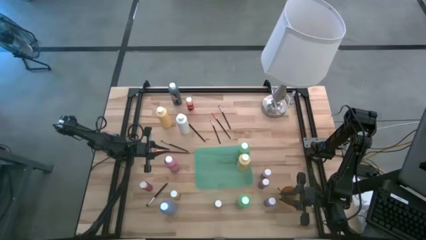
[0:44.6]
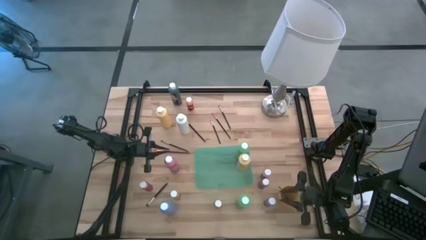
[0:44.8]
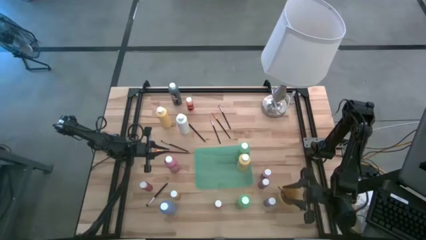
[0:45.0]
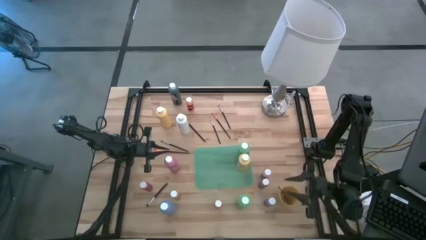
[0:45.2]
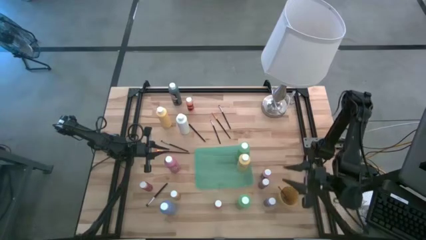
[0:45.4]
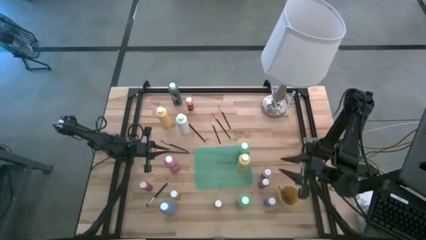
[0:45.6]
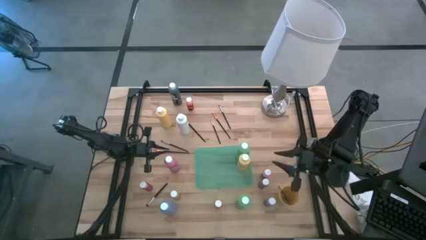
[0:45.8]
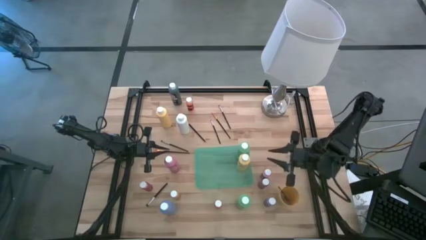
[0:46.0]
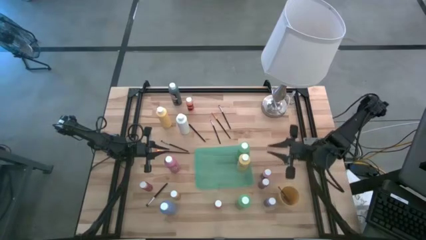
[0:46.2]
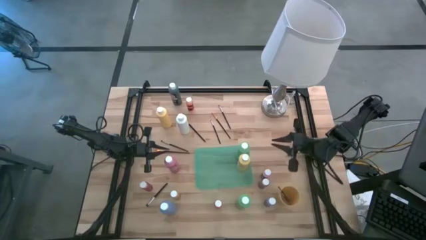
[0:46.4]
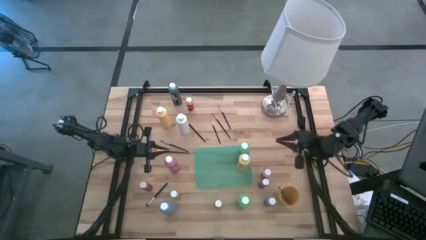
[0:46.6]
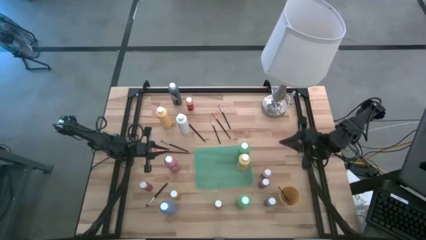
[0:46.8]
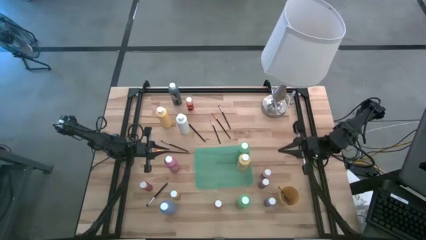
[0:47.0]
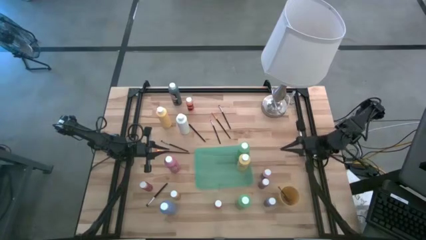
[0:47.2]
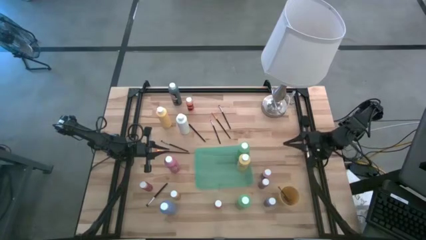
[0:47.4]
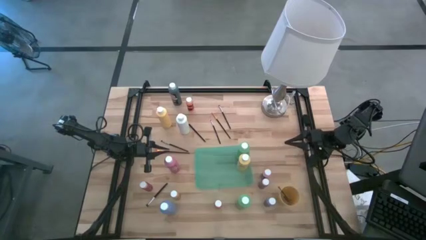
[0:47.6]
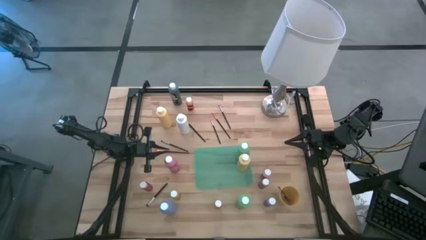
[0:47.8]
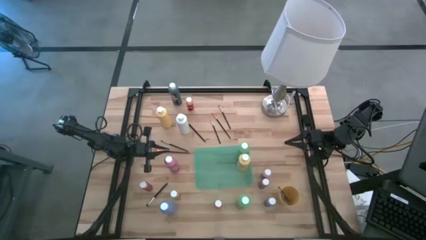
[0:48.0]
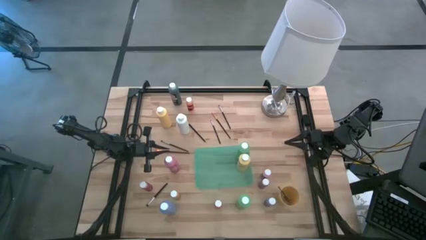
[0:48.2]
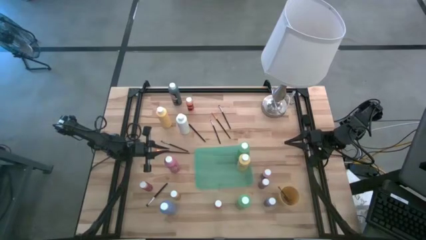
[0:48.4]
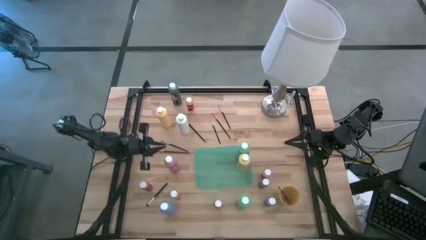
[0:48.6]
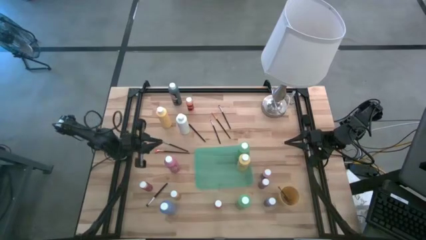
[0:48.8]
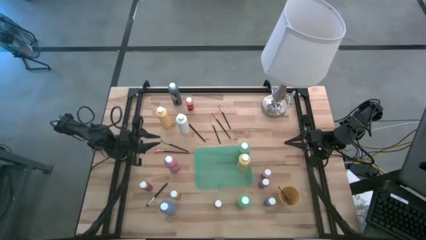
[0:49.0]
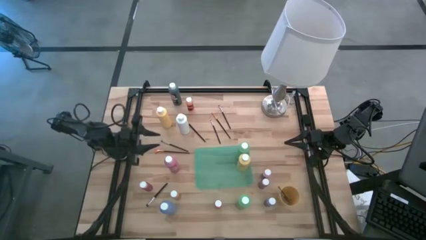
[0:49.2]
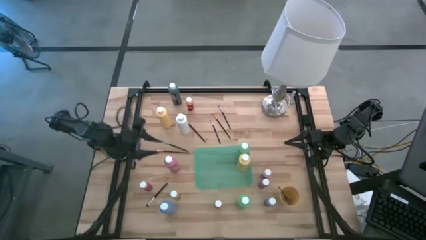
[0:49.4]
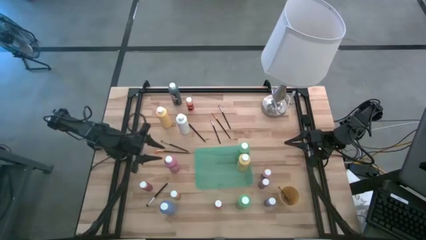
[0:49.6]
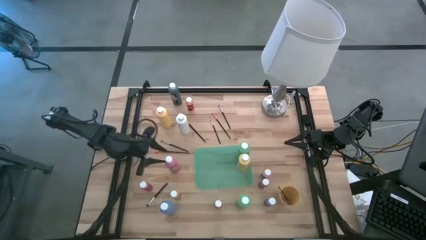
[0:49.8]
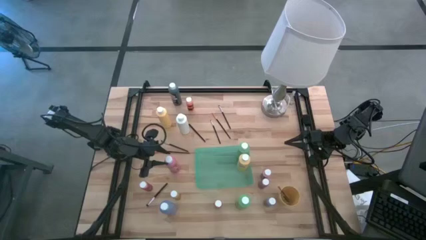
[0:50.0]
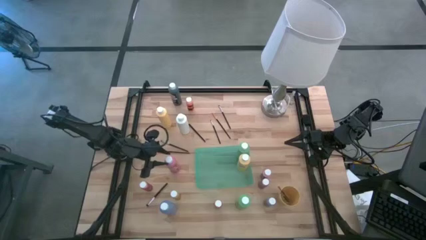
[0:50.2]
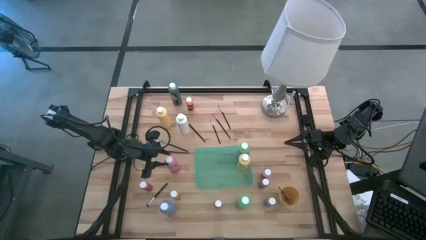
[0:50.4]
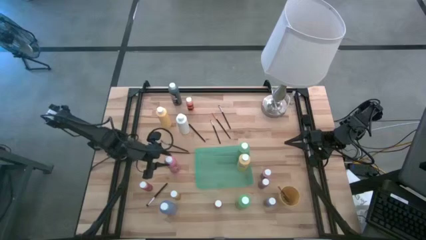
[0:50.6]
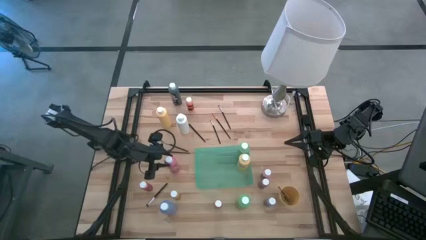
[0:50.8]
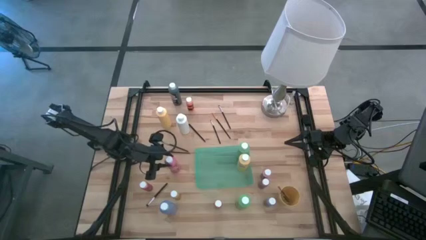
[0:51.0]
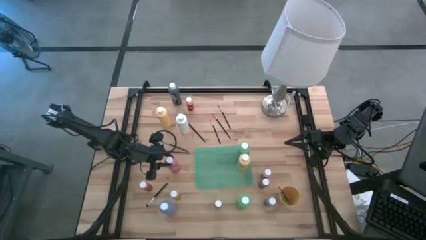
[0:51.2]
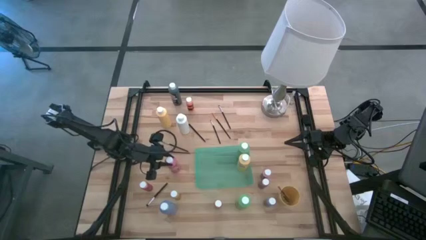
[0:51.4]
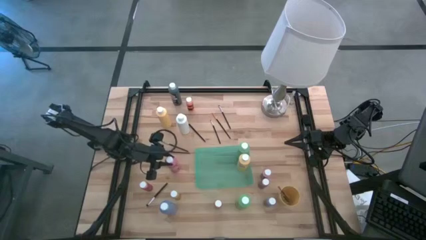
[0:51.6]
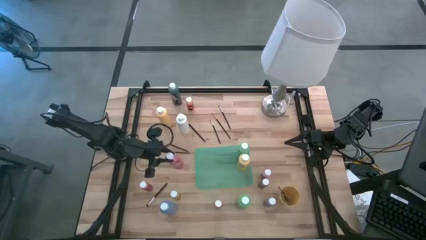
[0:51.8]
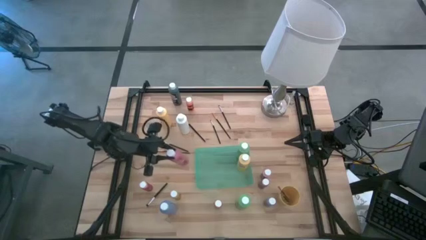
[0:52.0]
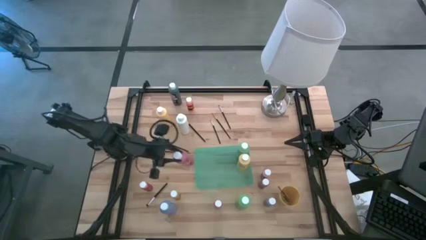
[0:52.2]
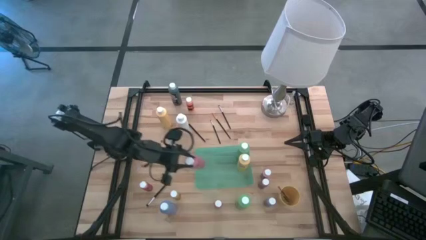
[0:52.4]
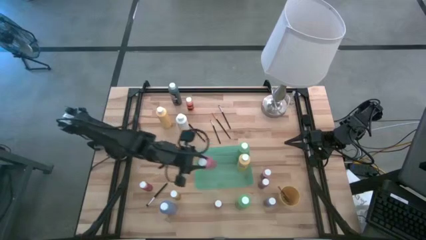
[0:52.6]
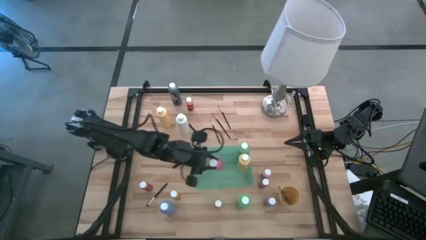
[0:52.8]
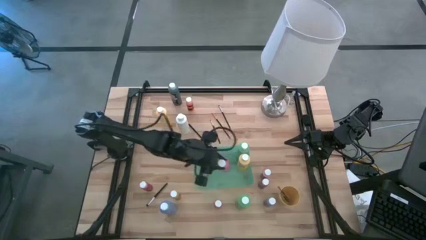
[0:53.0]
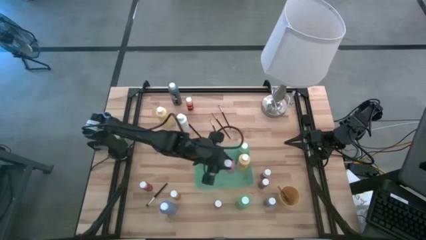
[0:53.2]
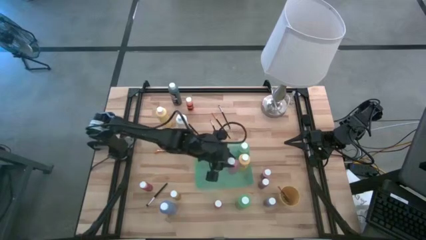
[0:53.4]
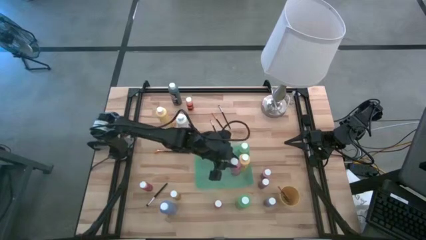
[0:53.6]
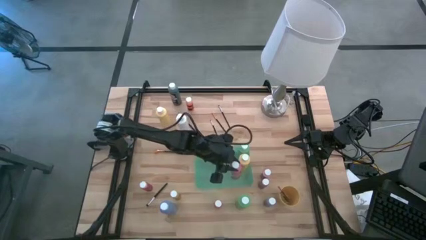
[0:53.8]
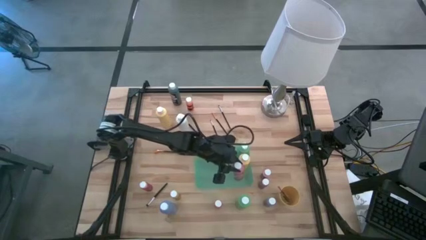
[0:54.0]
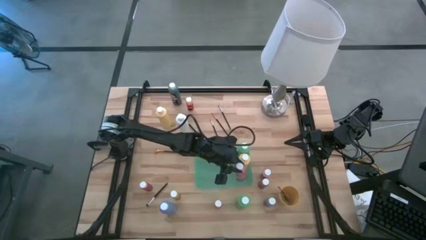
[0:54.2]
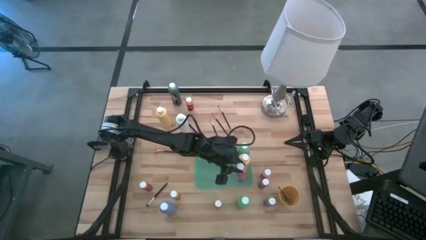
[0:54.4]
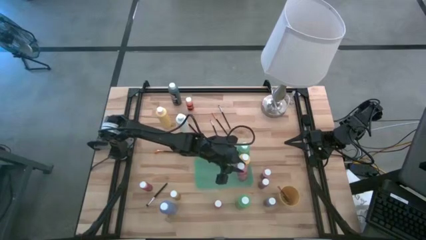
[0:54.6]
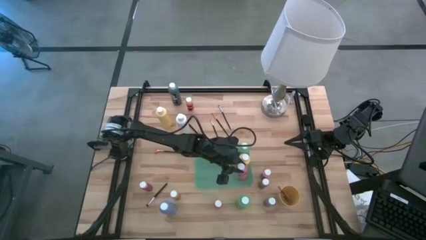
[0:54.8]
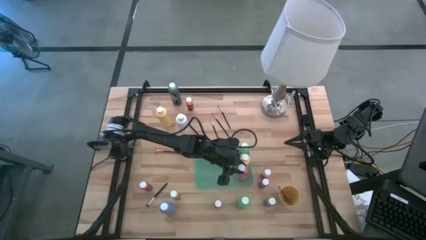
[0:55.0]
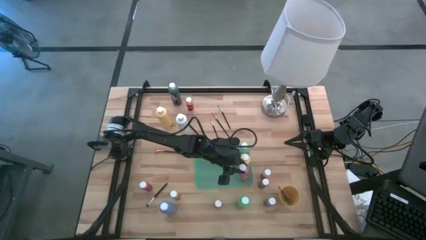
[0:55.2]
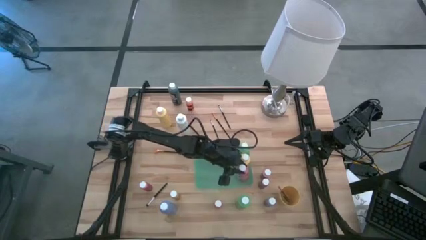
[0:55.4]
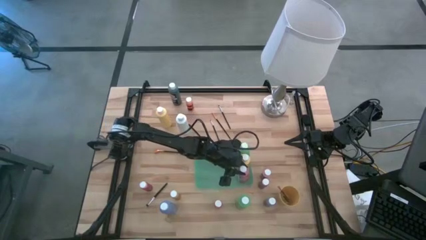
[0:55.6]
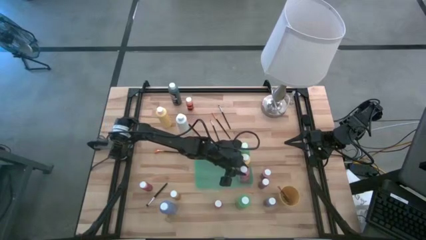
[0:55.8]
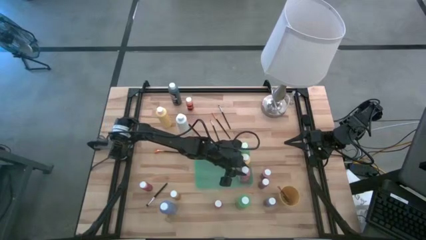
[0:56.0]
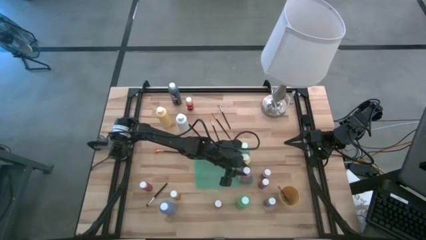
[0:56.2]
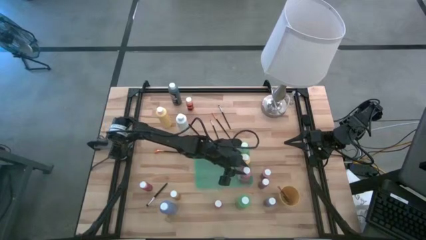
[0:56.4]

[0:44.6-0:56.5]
Task: Pick & Place Paint Supplies
Put the light pink paint bottle into the green bin
